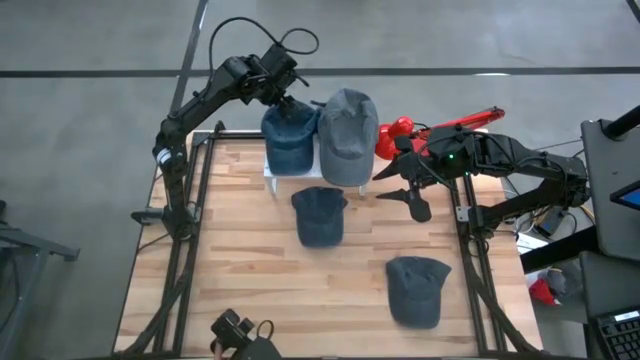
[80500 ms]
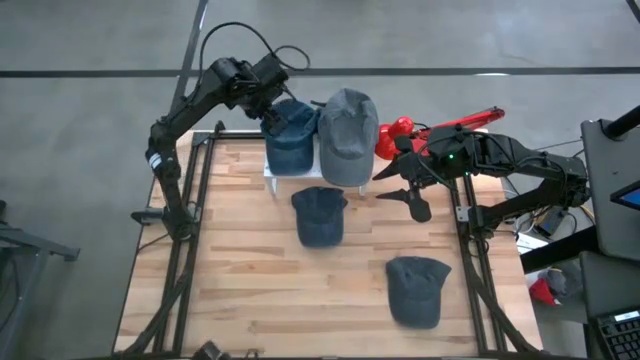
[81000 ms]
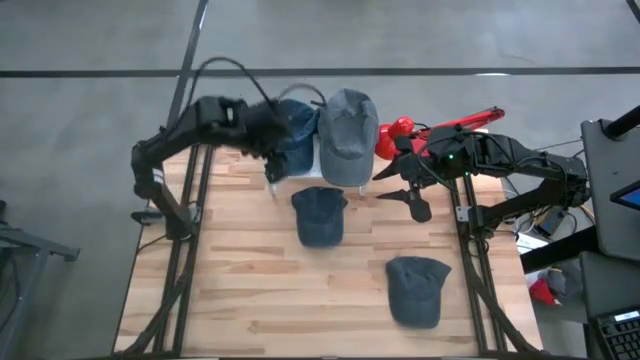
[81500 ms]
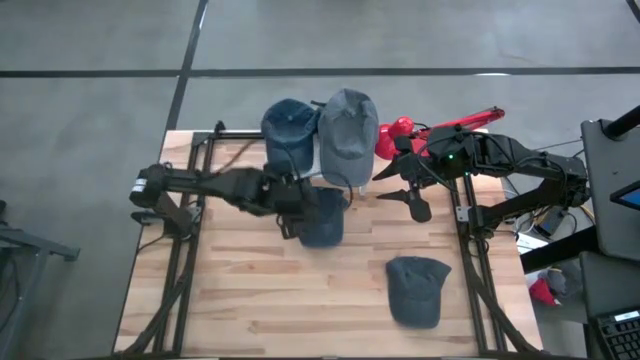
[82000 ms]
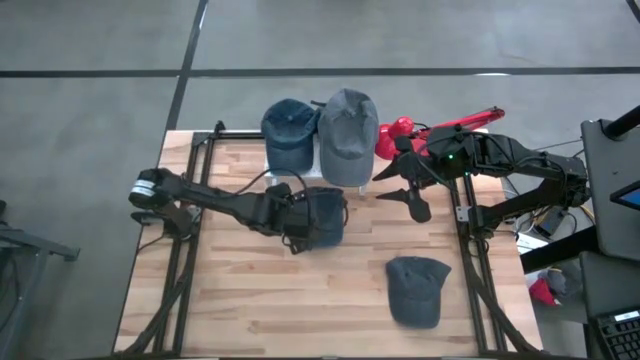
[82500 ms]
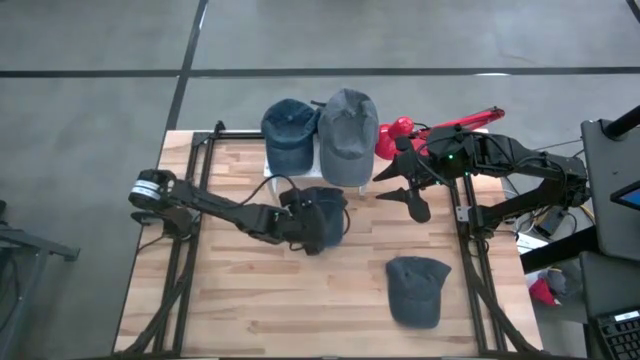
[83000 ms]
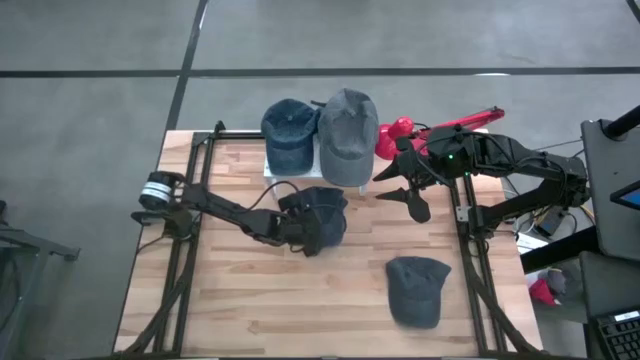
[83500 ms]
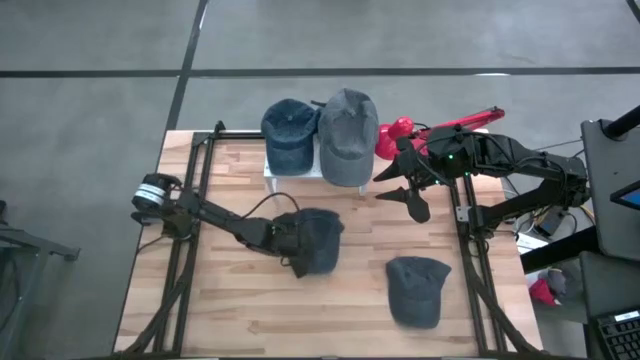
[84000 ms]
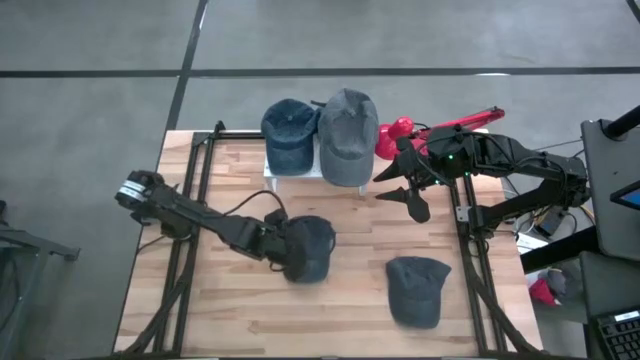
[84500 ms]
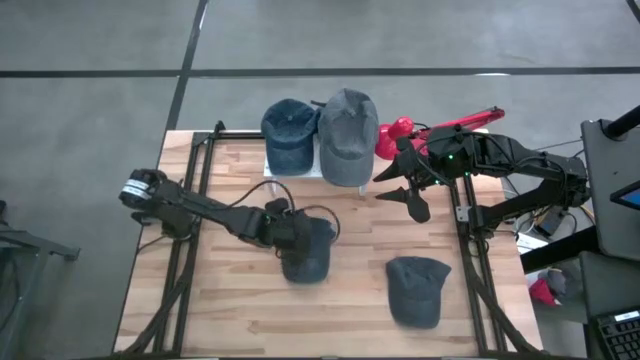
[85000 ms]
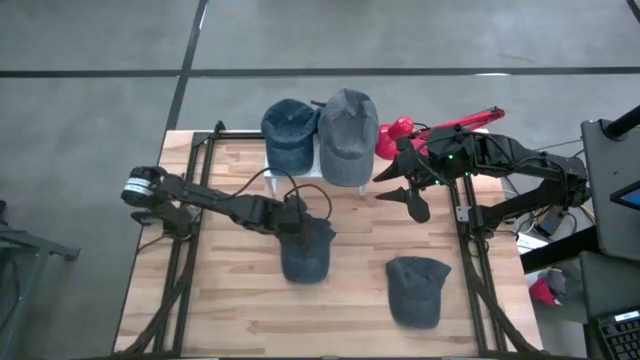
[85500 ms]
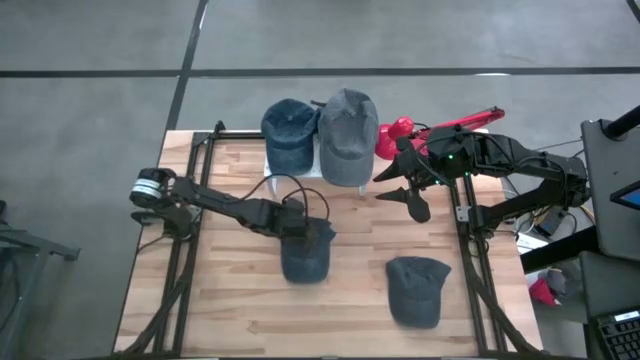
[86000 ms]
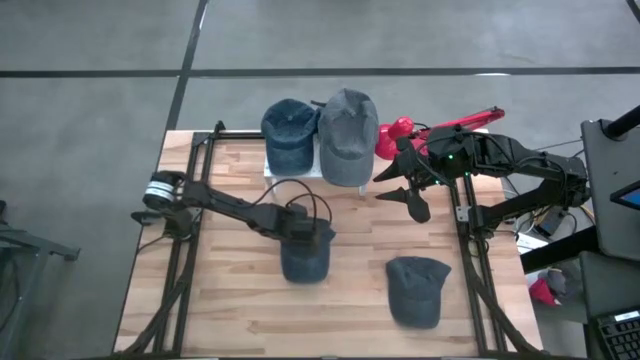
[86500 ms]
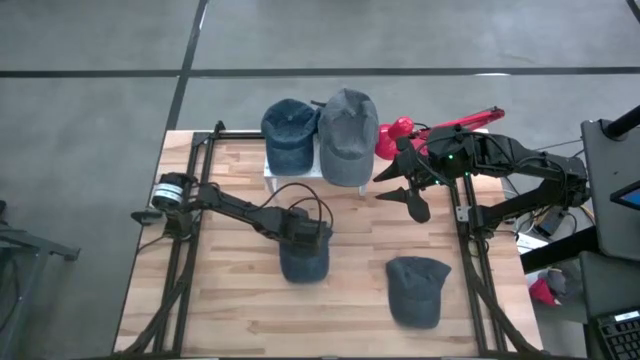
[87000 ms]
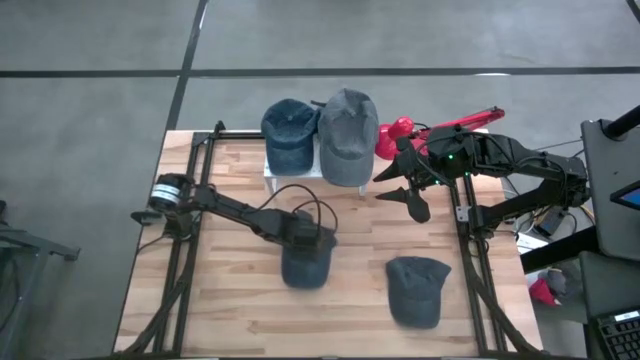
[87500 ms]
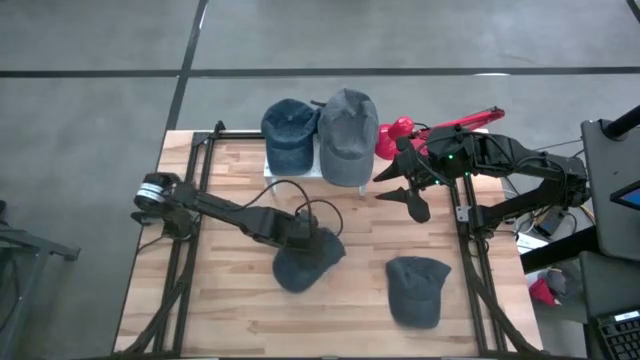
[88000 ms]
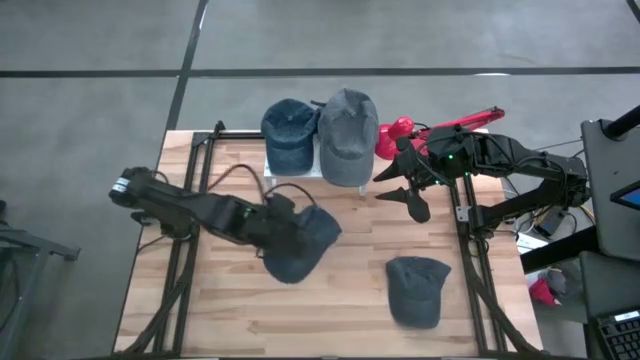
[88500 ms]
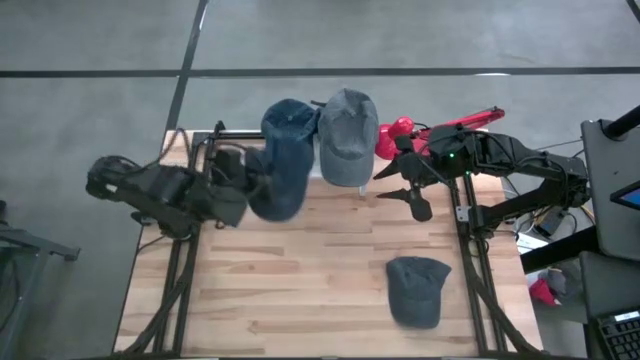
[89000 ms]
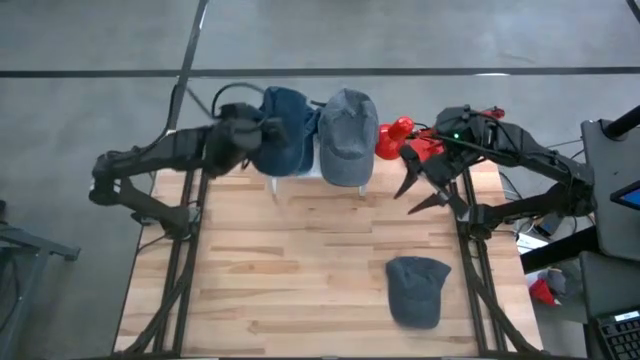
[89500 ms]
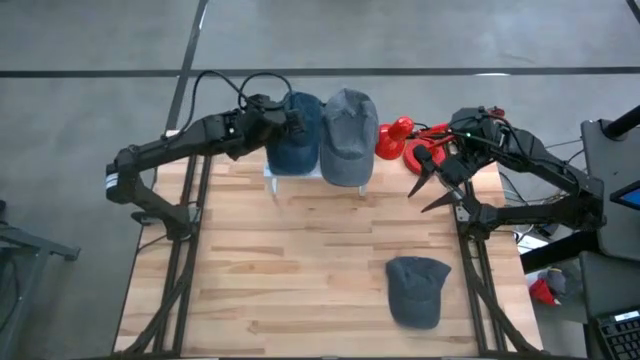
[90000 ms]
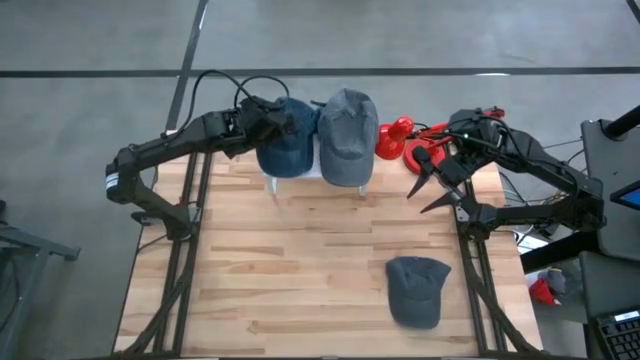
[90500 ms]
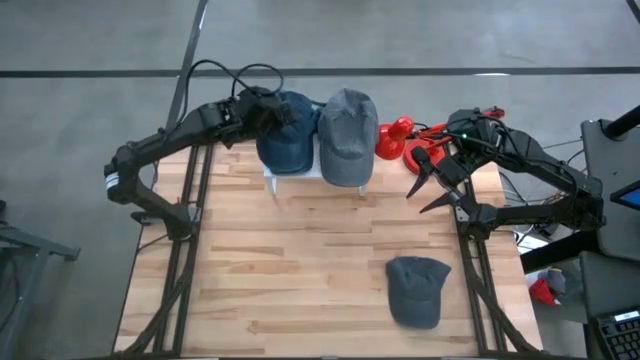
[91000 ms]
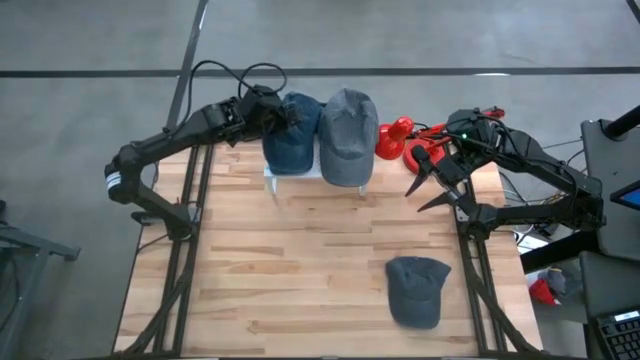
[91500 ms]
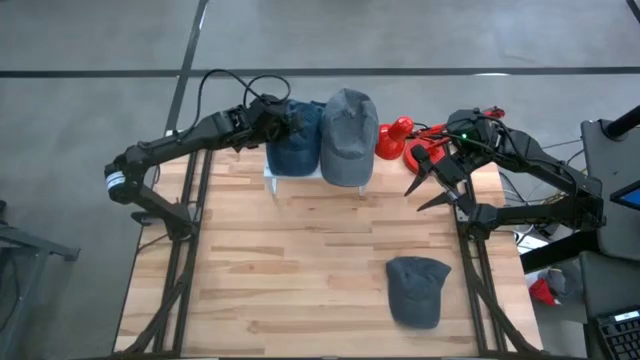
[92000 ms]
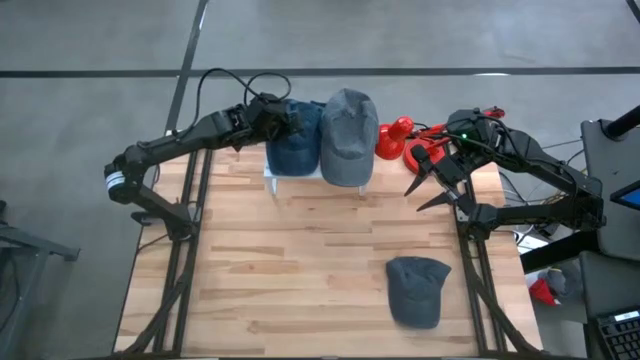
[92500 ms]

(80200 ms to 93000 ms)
Task: Pick & Place hat
Stack the left blue cap on the blue cap on the shelf

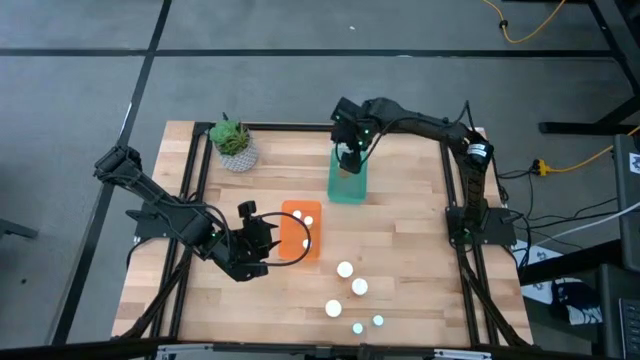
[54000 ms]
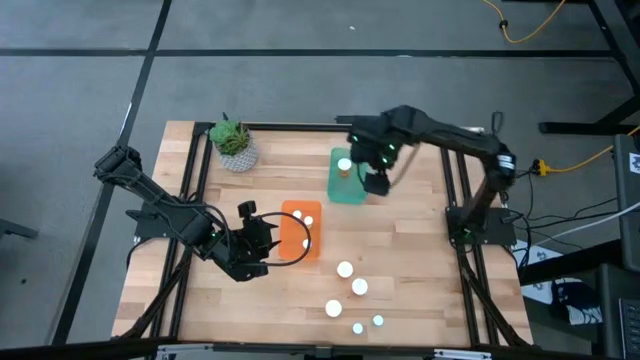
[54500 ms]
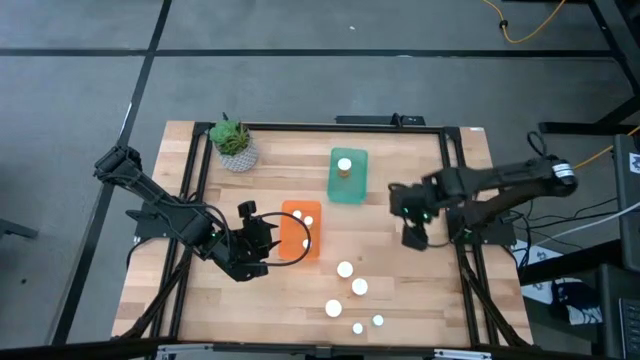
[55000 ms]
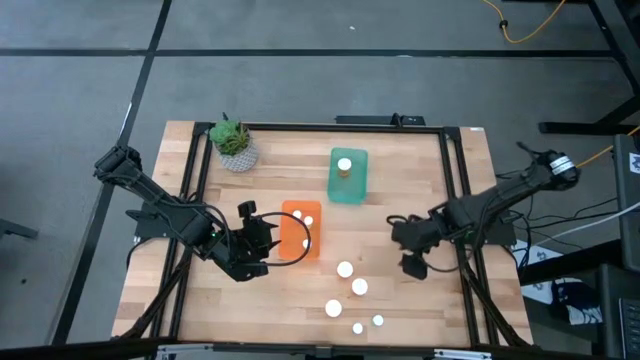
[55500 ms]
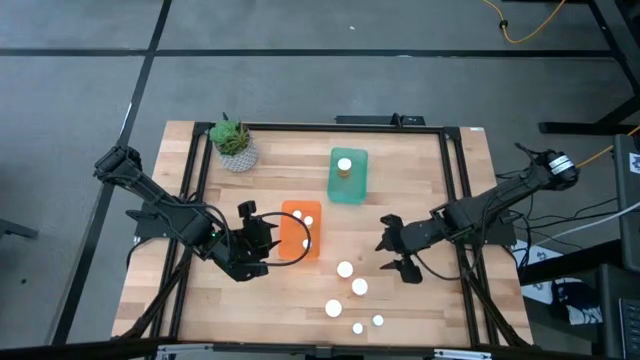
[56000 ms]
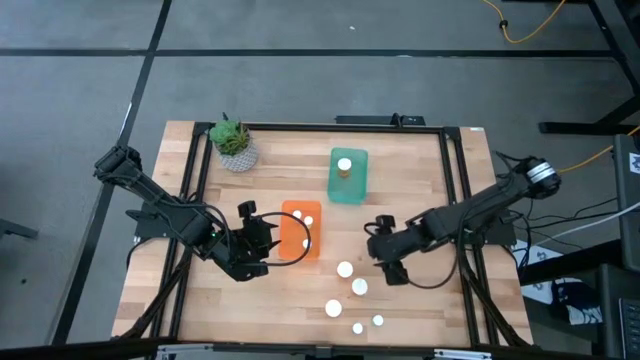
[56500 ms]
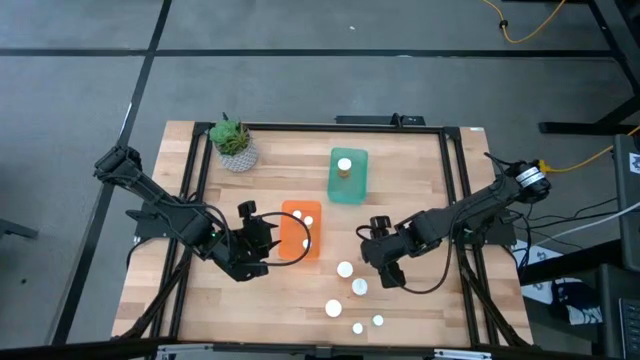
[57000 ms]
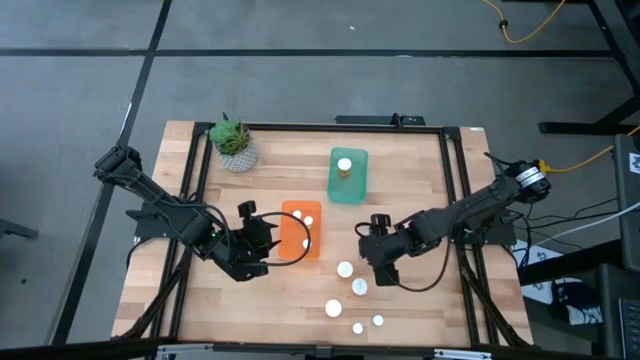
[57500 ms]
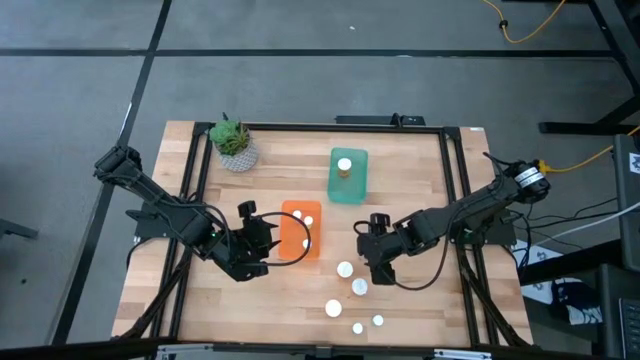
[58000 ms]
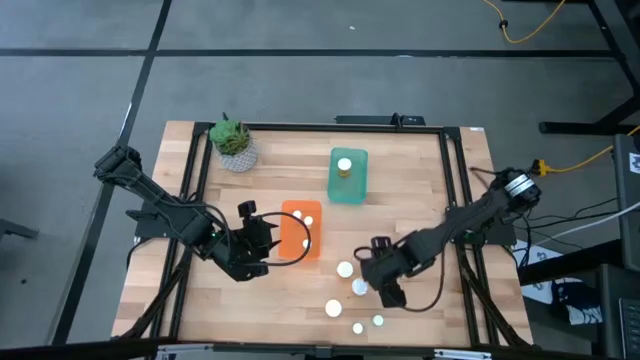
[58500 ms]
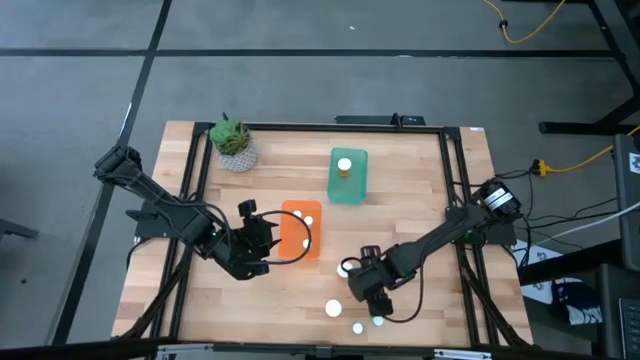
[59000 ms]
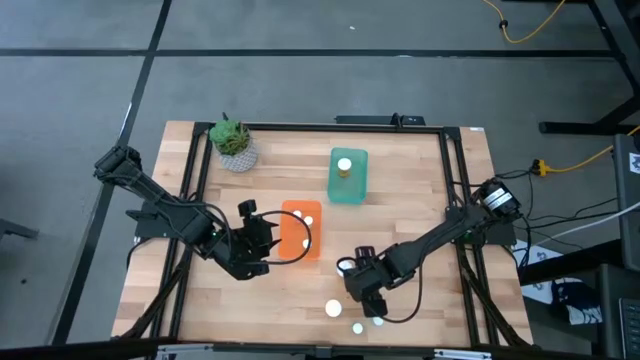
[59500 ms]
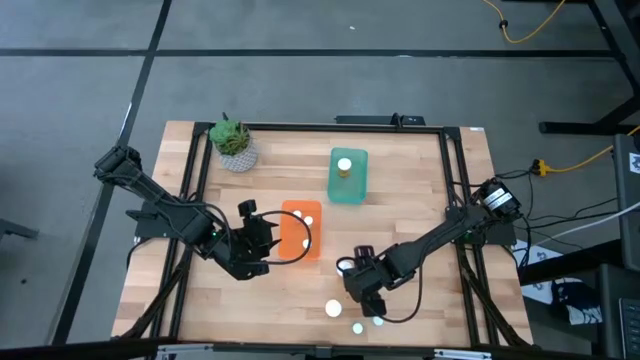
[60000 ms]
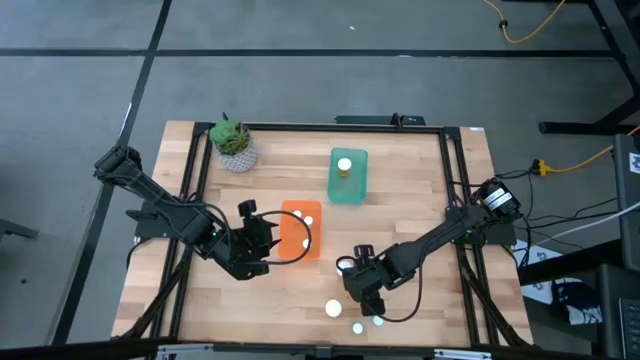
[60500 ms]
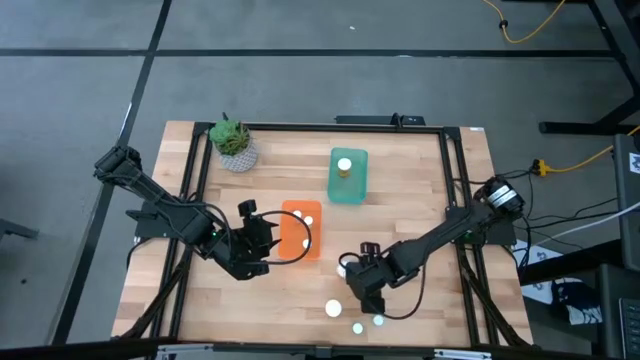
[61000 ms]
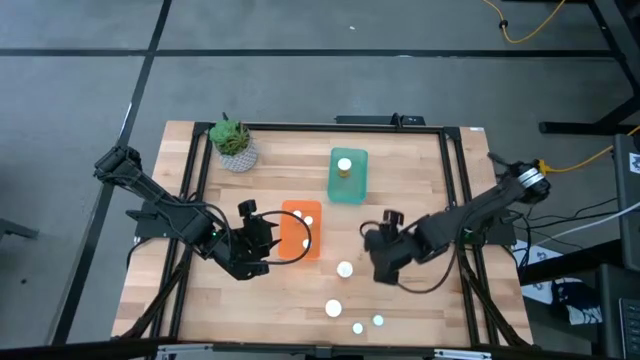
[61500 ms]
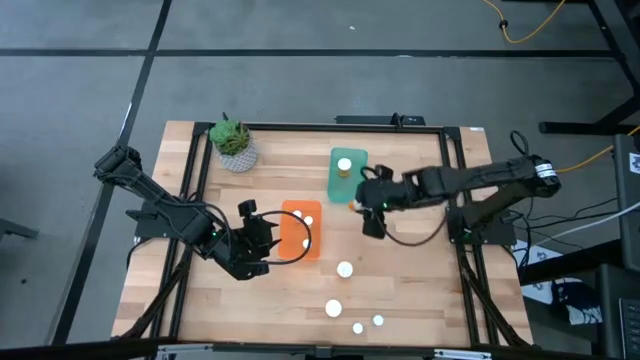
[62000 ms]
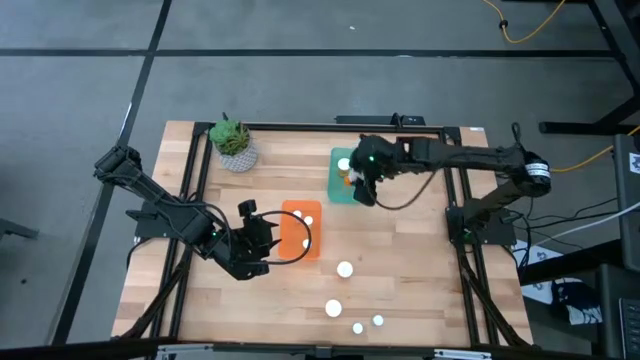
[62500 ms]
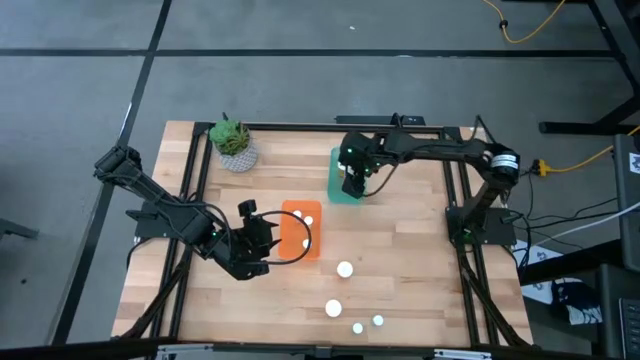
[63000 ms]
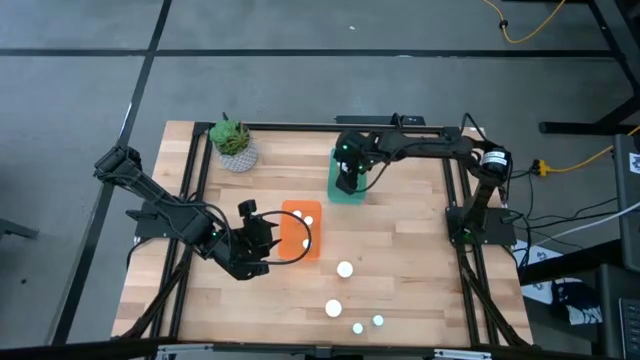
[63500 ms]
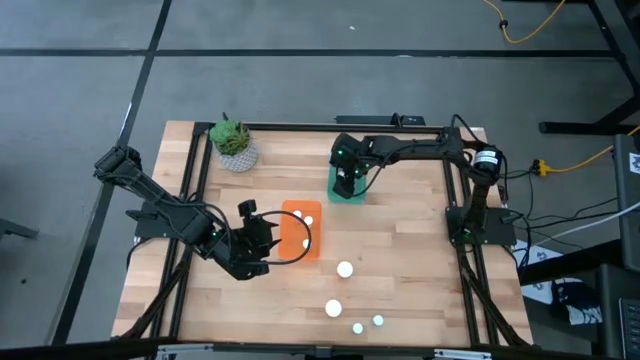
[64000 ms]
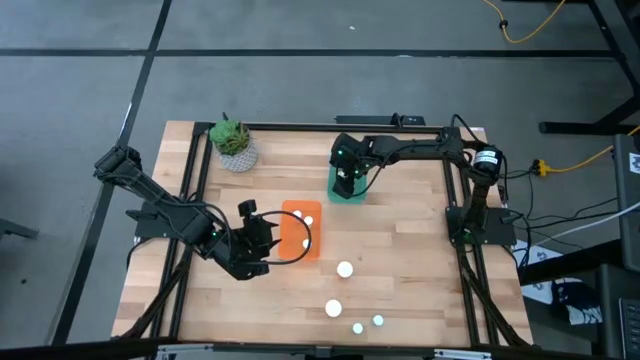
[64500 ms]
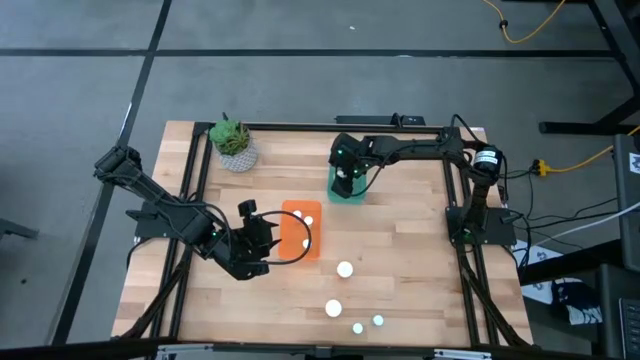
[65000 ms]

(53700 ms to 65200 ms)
Task: Pick and place medicine bottles into bin by pill shape (circle, oval)
Put the large orange pill bottle into the blue bin
